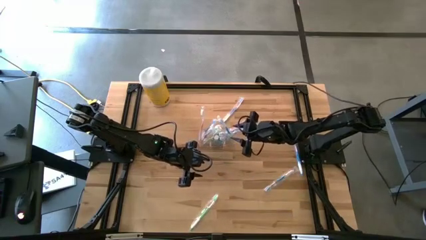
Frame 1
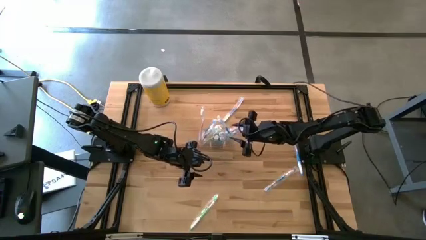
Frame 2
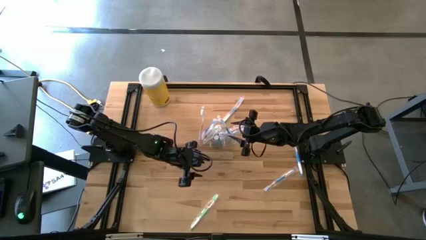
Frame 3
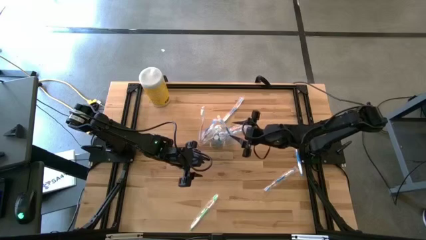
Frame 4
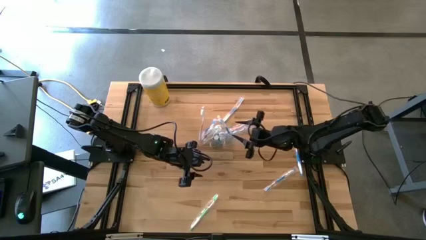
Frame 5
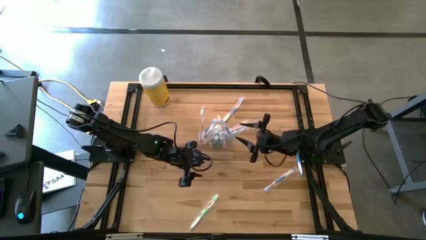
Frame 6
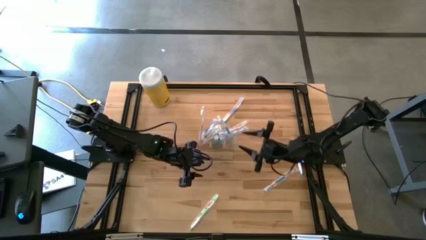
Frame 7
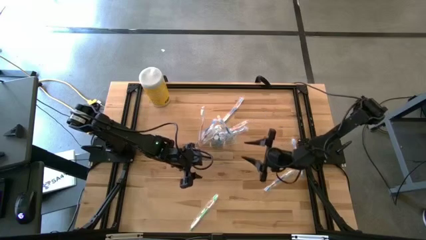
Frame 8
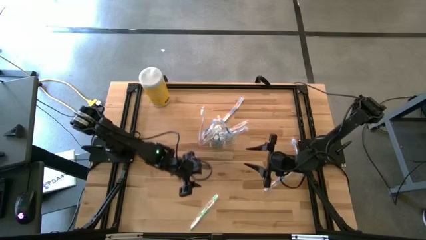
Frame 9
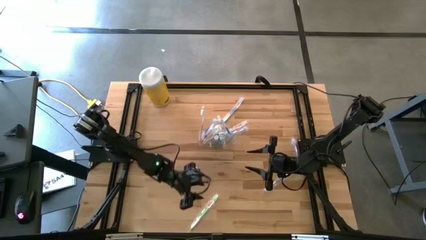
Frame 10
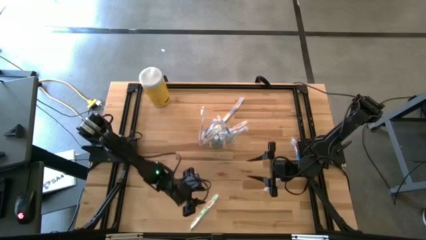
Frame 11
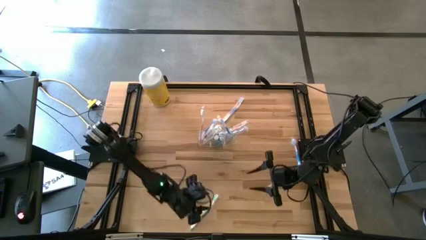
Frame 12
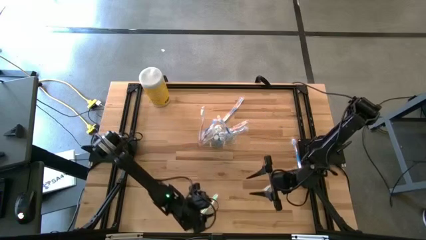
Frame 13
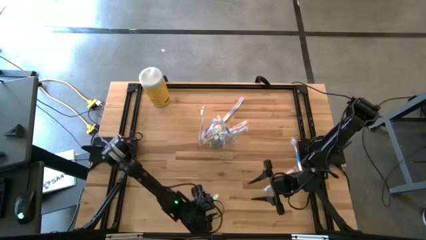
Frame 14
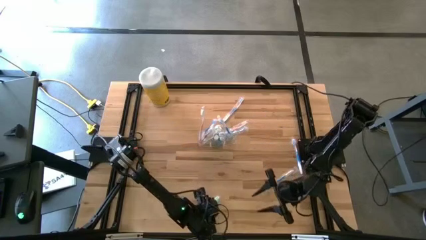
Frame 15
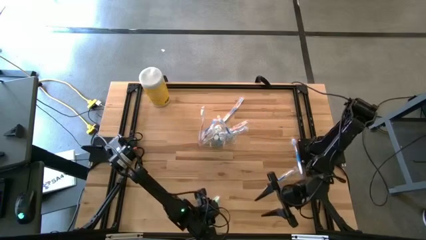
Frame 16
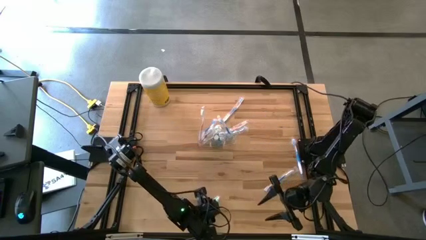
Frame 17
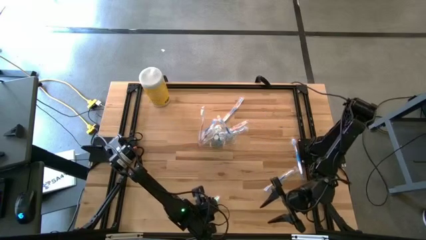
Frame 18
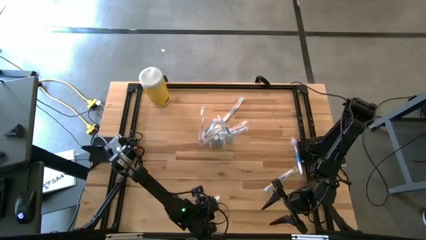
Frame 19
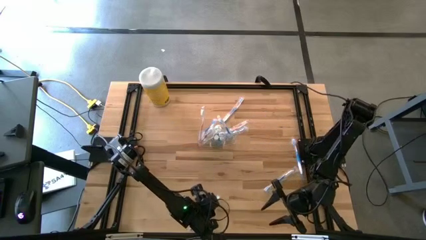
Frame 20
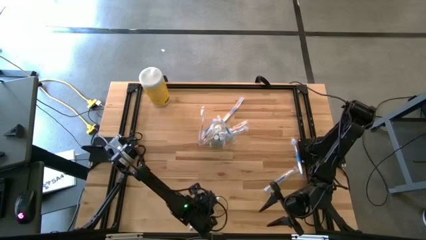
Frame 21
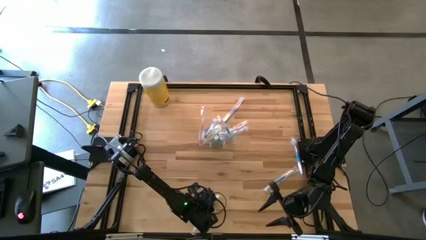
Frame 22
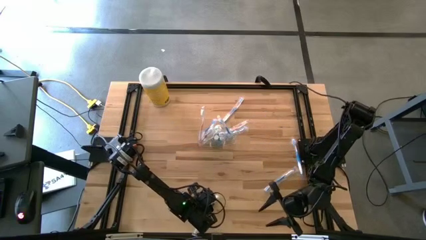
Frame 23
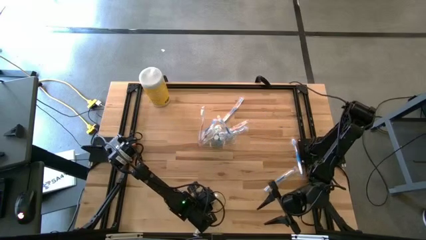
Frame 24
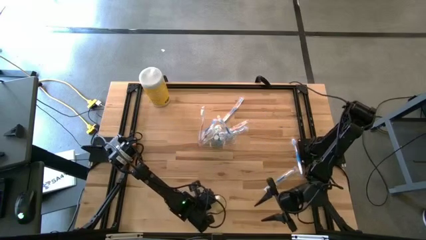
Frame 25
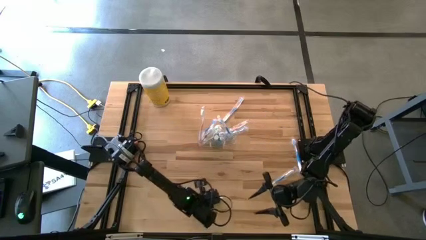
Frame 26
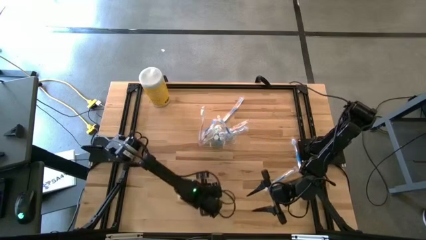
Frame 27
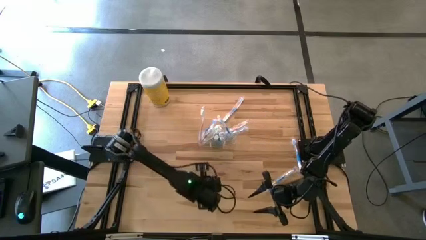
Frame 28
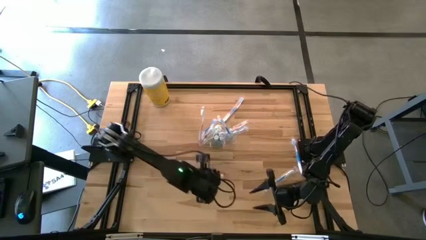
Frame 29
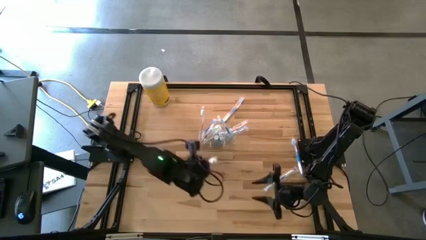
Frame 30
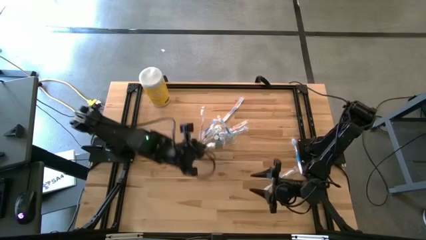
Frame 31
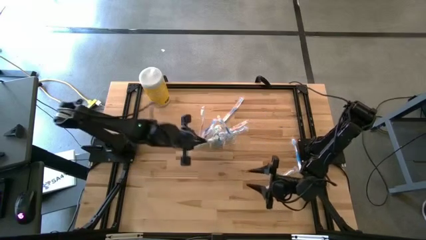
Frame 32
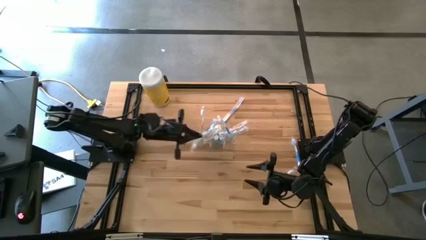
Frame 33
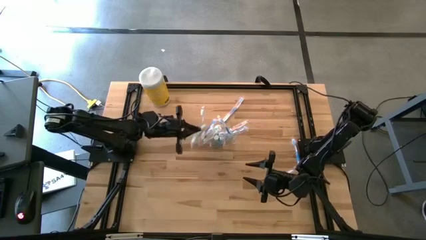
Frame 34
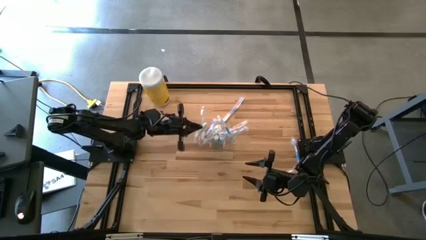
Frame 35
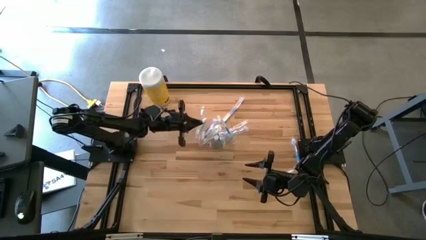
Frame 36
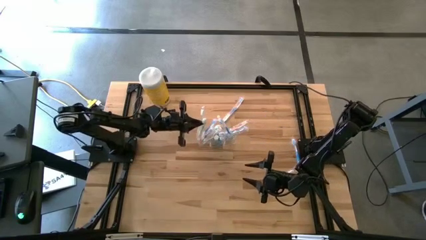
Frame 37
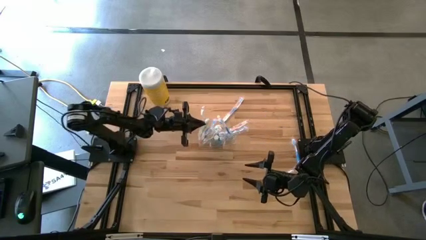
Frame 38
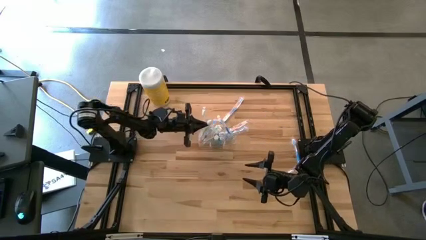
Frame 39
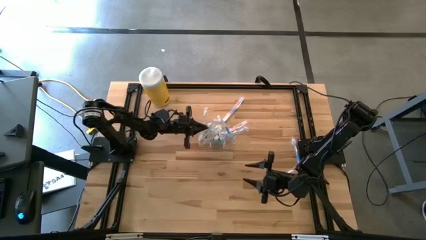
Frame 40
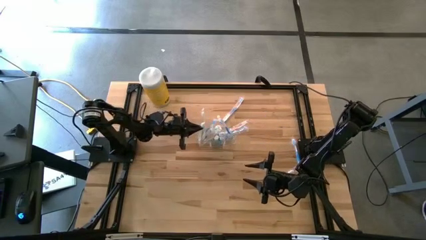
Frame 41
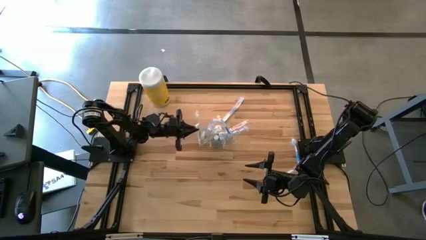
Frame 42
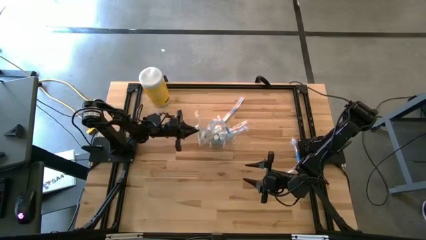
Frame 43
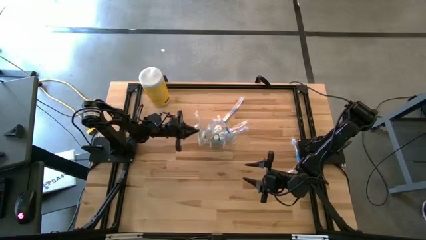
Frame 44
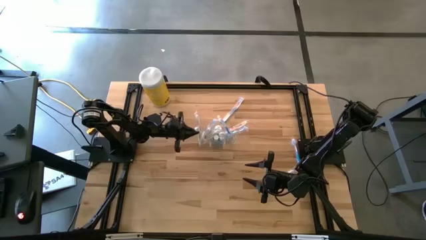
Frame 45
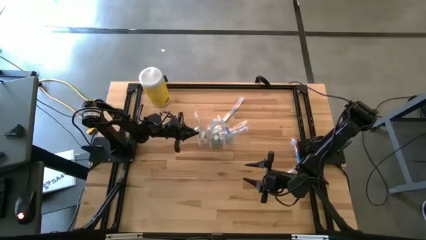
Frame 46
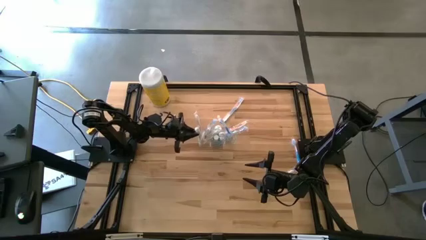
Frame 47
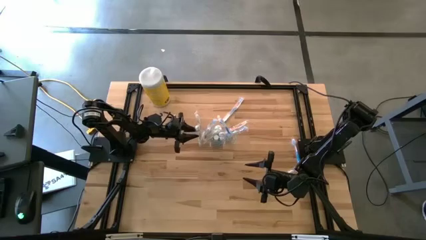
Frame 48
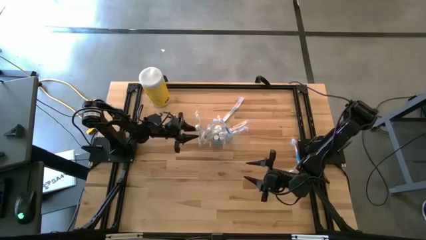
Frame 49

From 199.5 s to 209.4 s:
Task: Pick & Place toothbrushing station
Put the green toothbrush into the transparent organizer

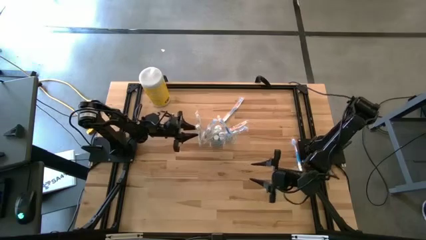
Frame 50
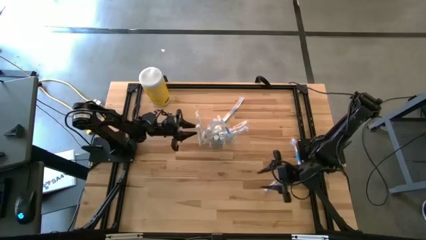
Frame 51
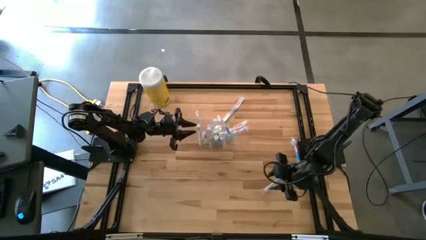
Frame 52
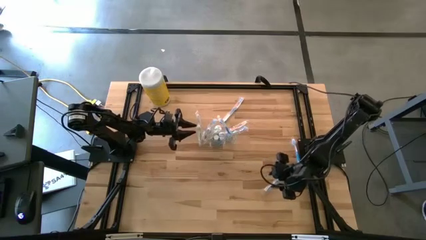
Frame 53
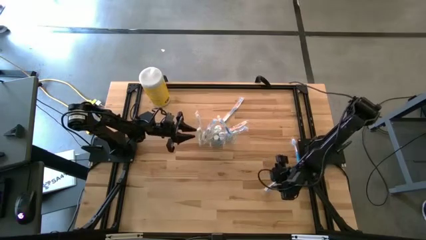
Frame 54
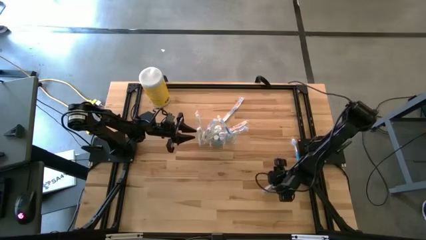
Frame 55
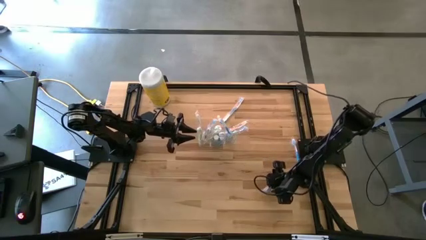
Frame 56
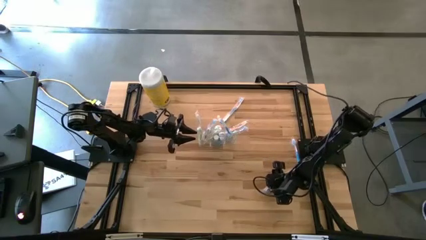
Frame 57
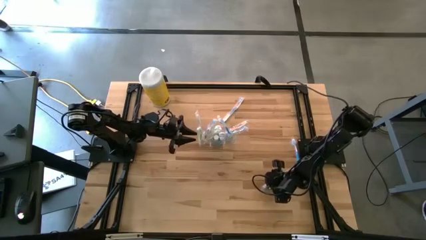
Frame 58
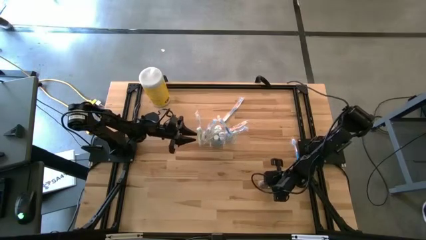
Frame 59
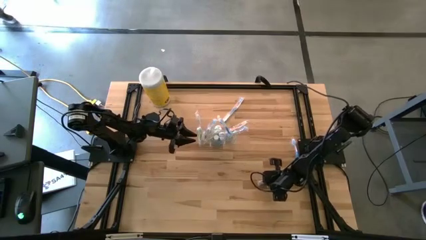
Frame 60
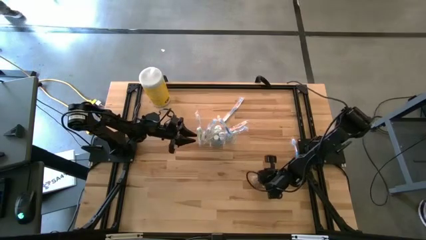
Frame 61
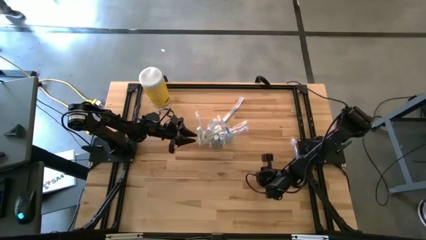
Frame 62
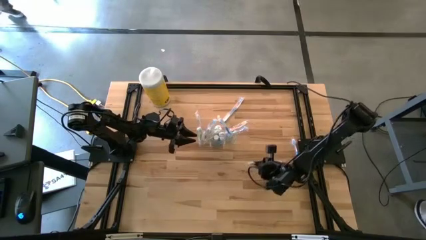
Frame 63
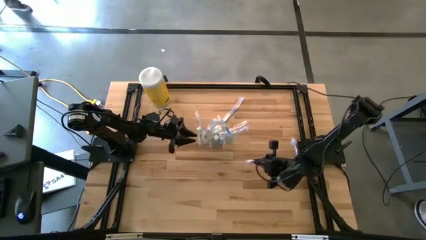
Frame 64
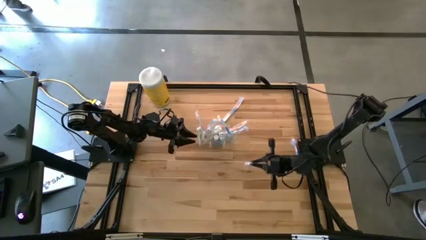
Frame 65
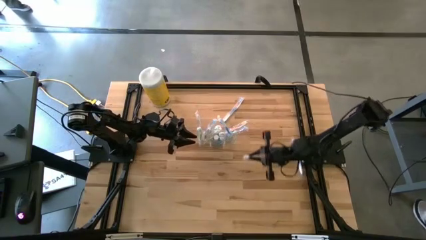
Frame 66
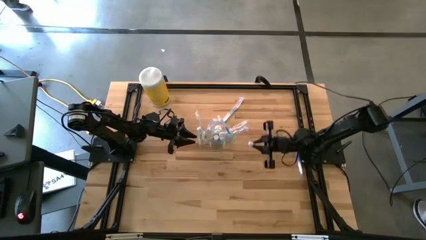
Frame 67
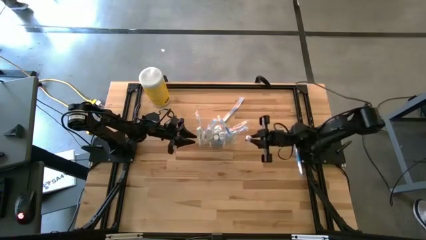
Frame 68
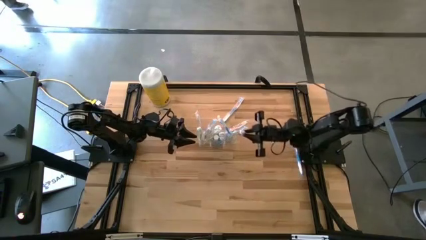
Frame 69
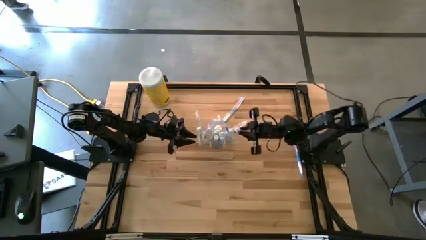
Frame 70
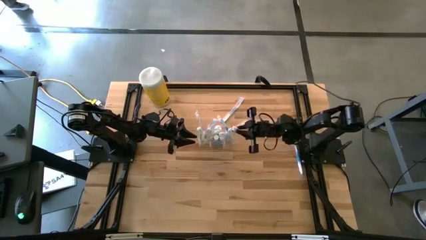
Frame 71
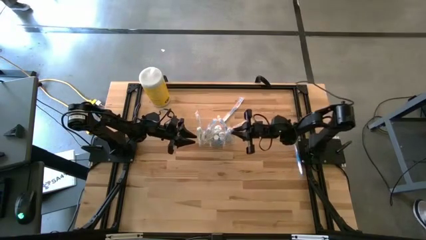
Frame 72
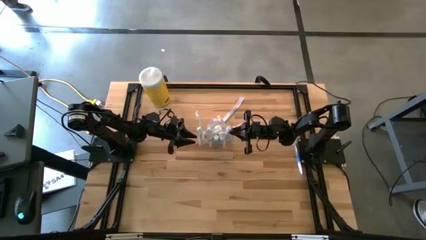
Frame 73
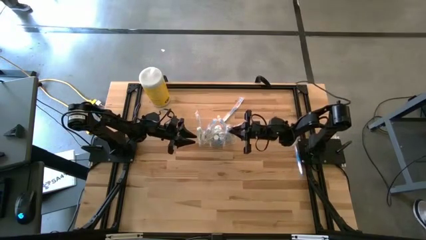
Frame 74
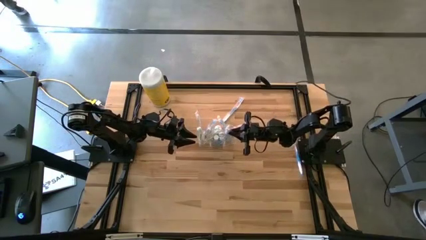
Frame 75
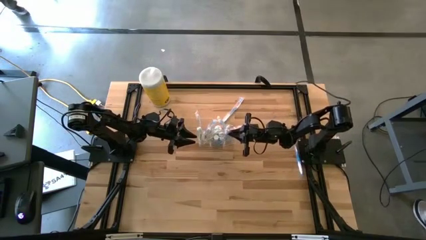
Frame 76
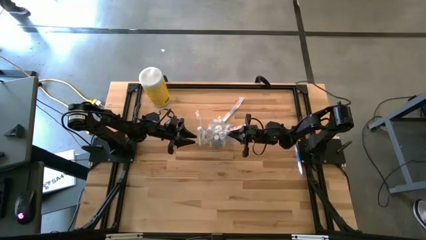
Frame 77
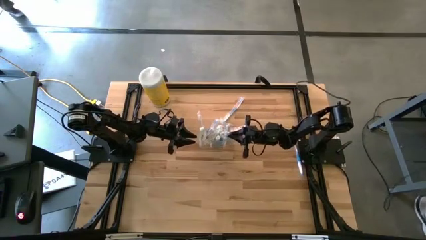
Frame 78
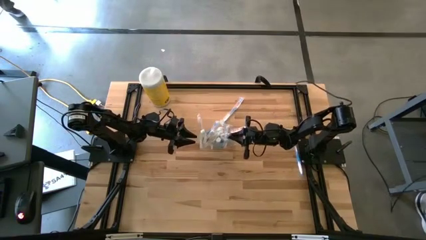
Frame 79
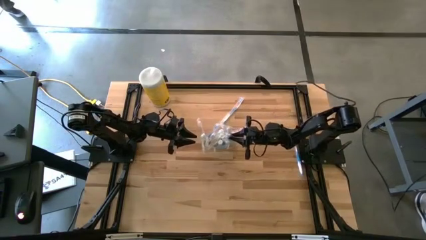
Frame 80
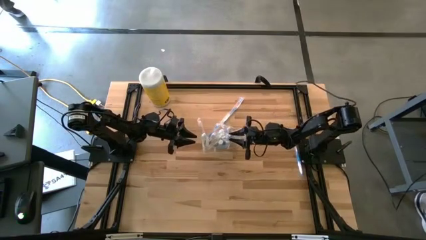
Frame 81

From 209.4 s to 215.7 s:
Put the blue toothbrush into the transparent organizer
